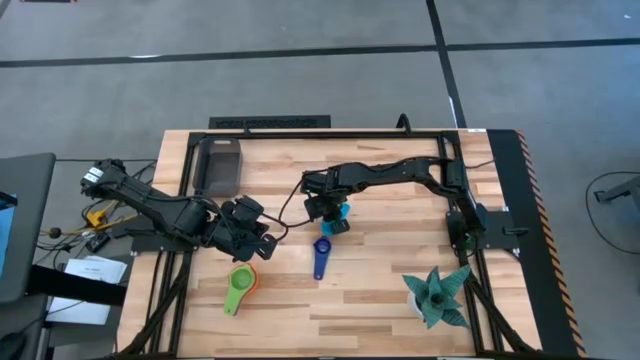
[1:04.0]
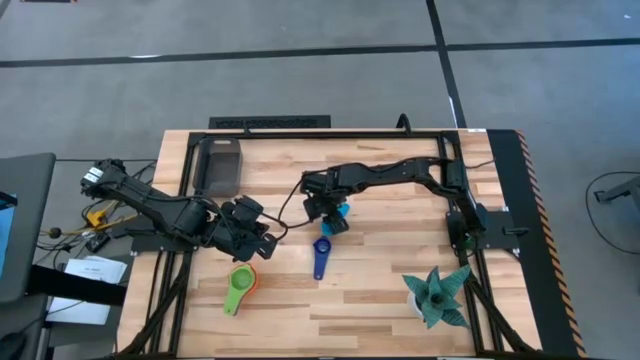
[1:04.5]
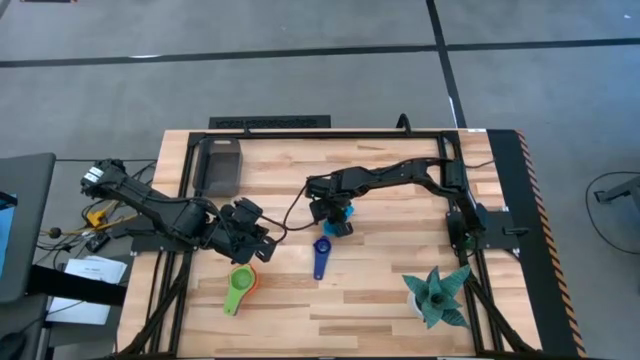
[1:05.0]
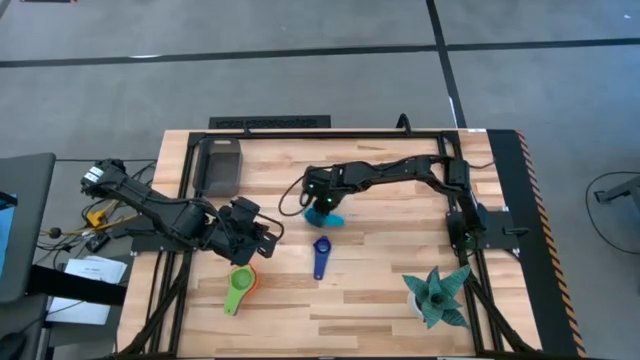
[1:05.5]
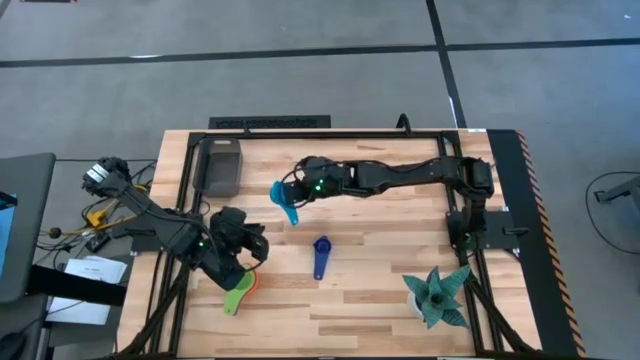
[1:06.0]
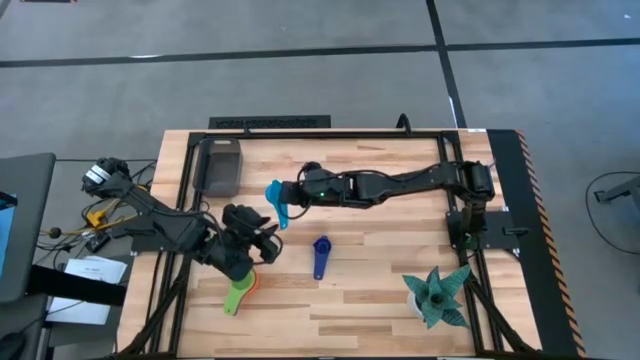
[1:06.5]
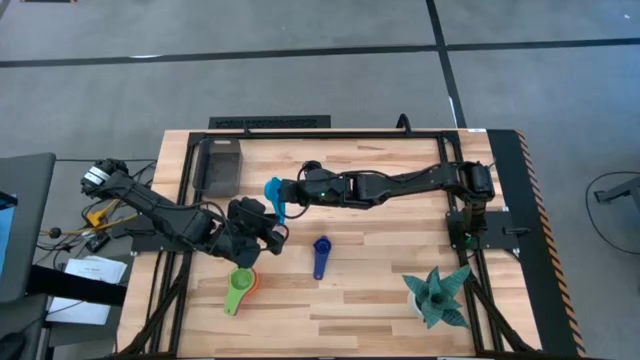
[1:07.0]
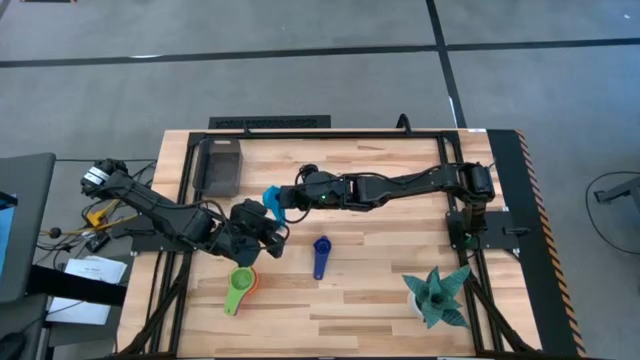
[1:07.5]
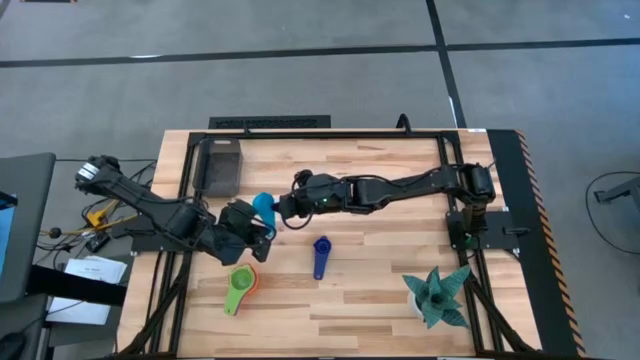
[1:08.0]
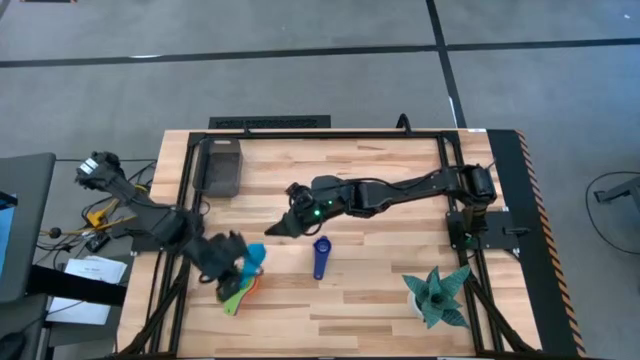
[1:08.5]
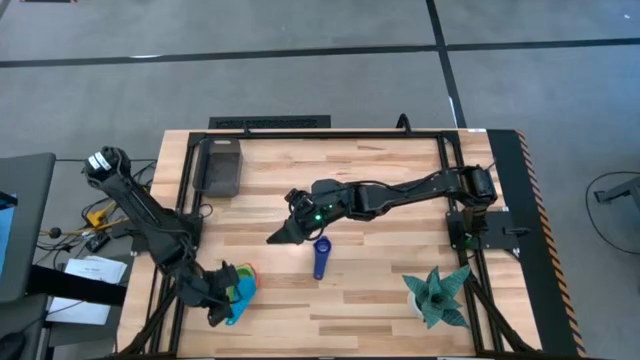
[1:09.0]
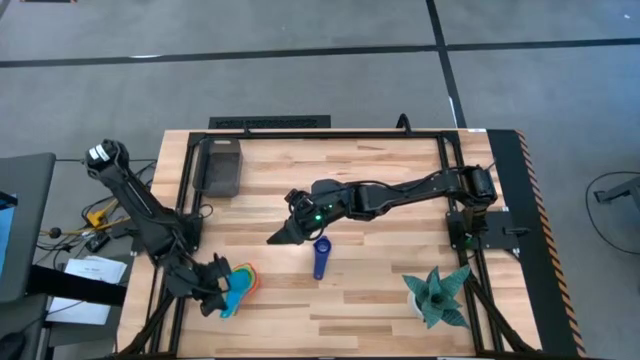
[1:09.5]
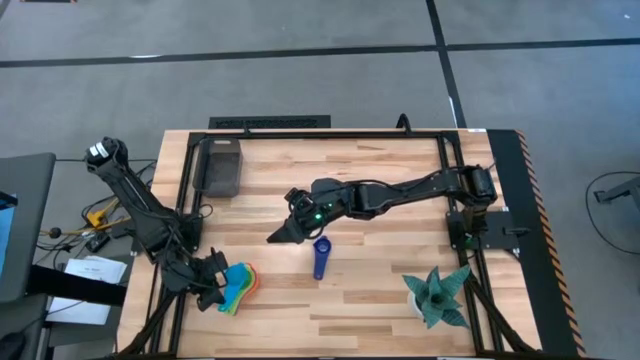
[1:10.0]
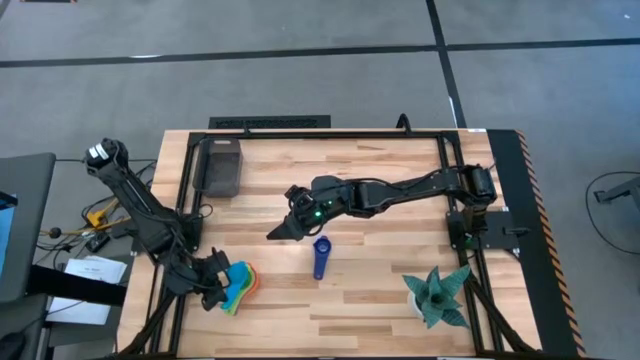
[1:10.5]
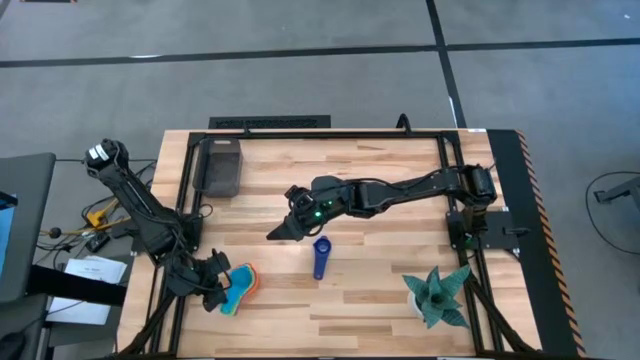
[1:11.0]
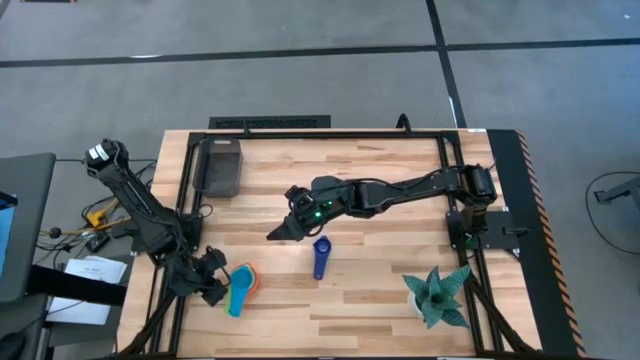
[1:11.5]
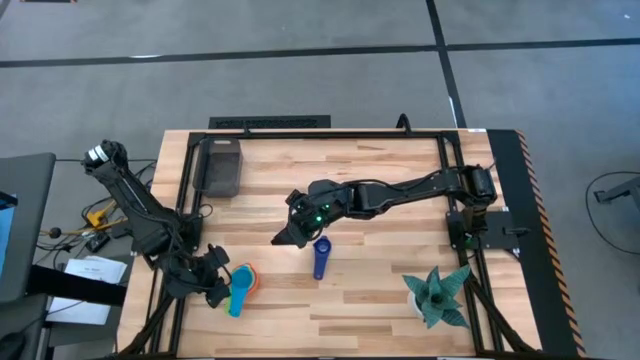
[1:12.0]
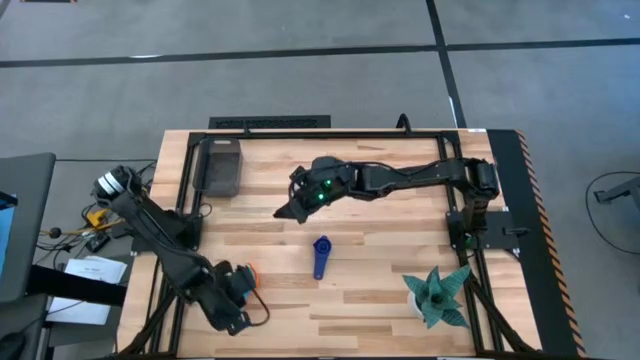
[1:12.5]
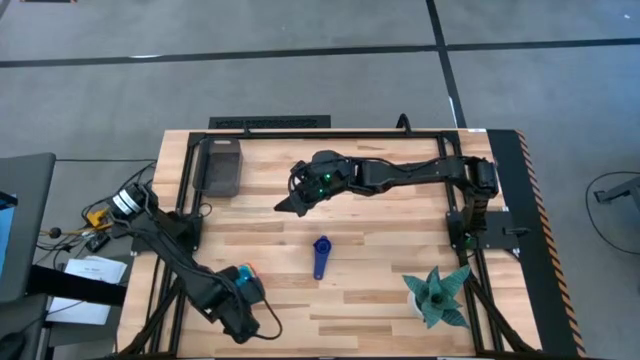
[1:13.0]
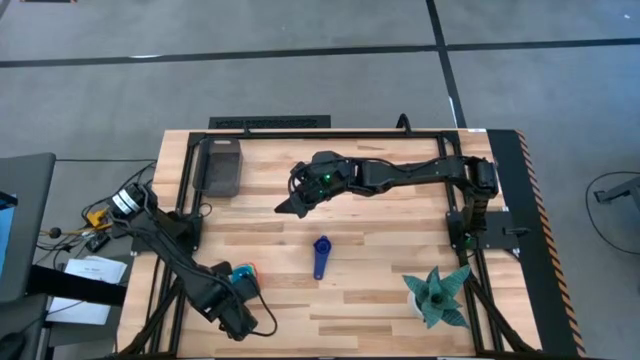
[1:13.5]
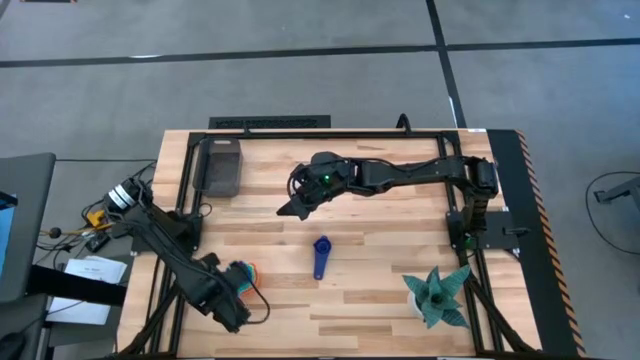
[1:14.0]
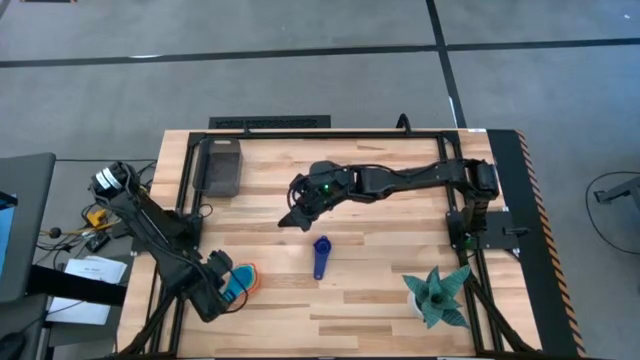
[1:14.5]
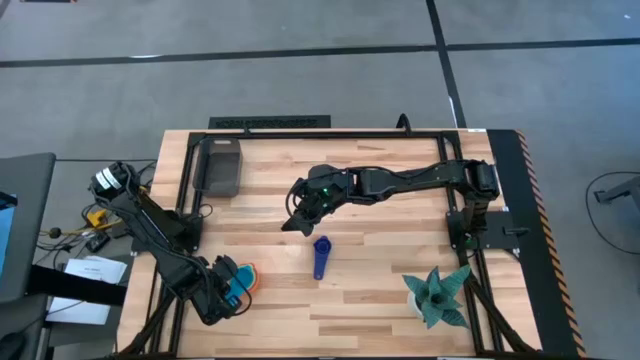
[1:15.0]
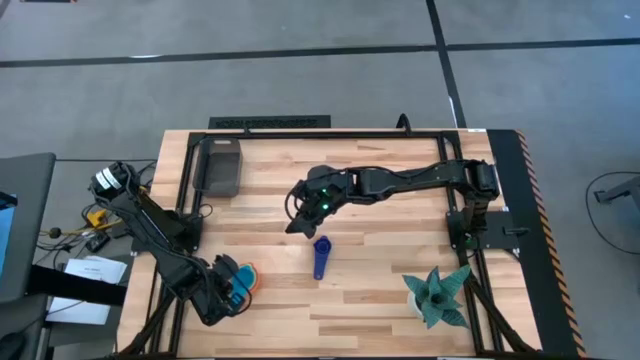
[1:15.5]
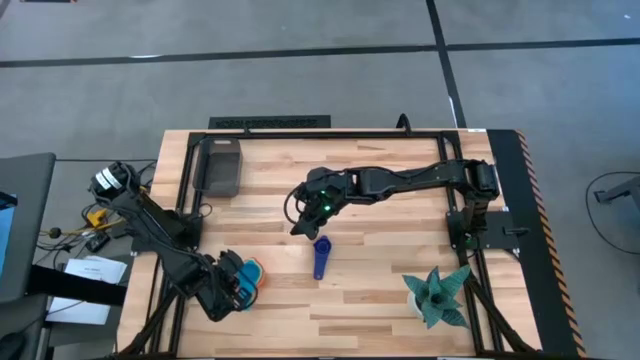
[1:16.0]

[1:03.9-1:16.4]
Task: Nest measuring cups in basket
Stack the light blue measuring cup on top of the light green measuring cup

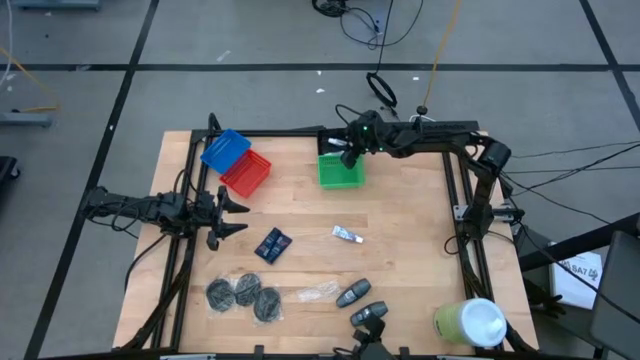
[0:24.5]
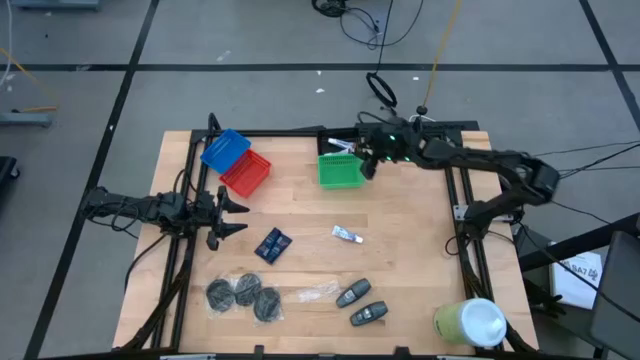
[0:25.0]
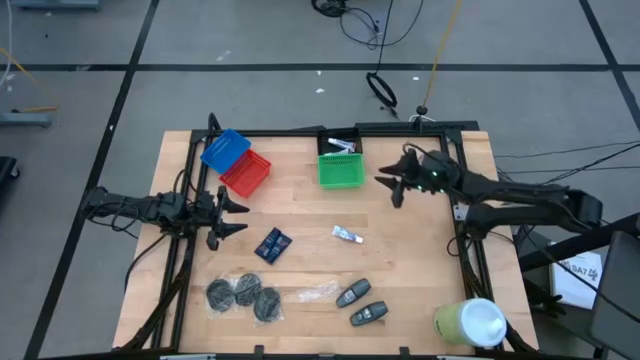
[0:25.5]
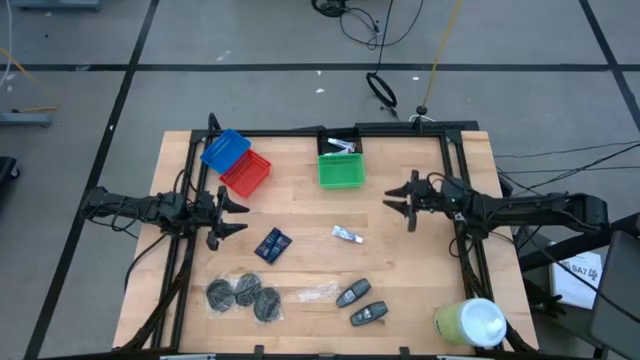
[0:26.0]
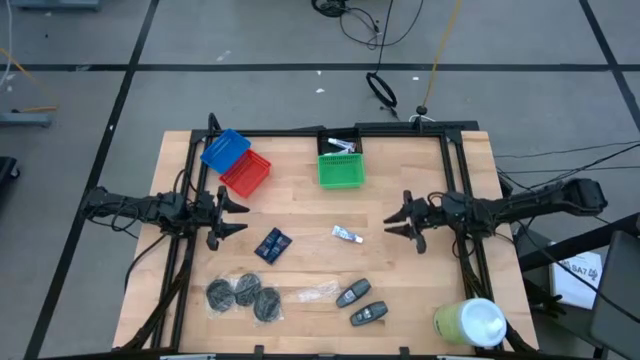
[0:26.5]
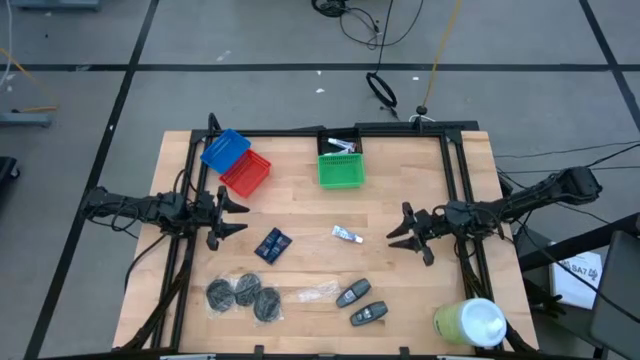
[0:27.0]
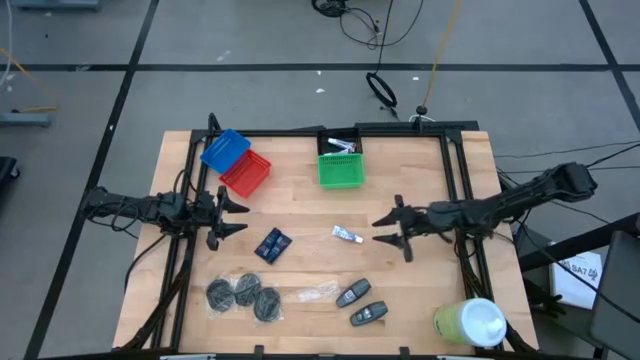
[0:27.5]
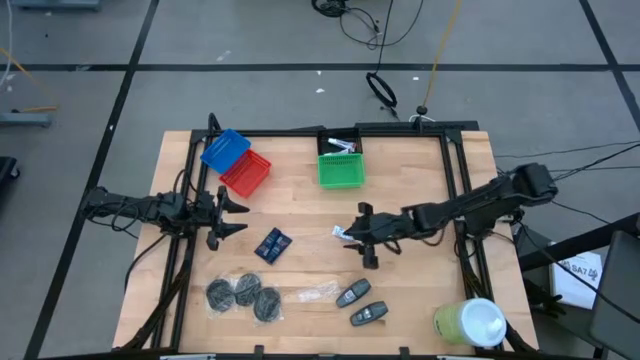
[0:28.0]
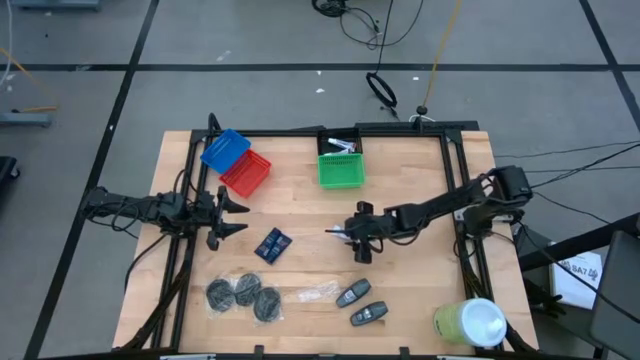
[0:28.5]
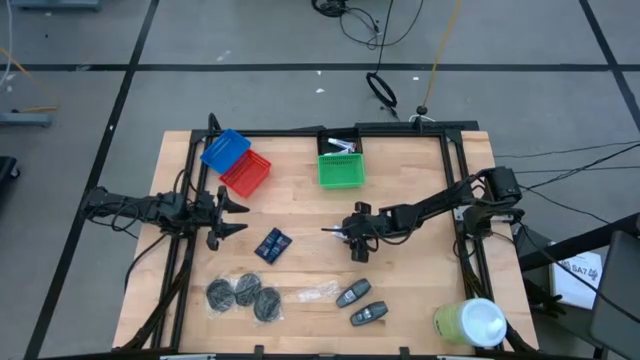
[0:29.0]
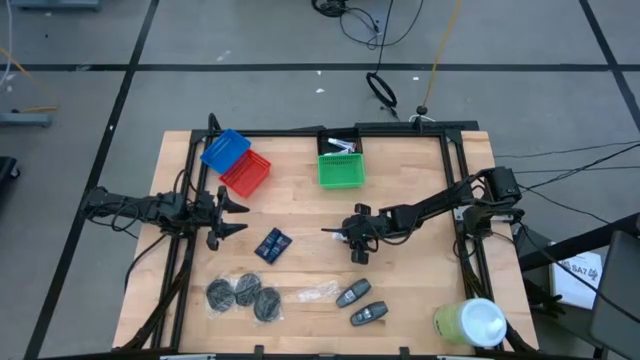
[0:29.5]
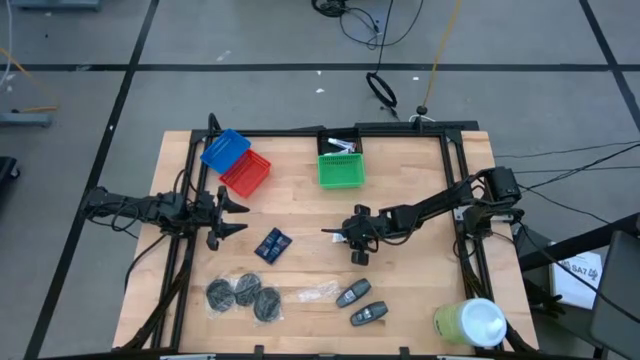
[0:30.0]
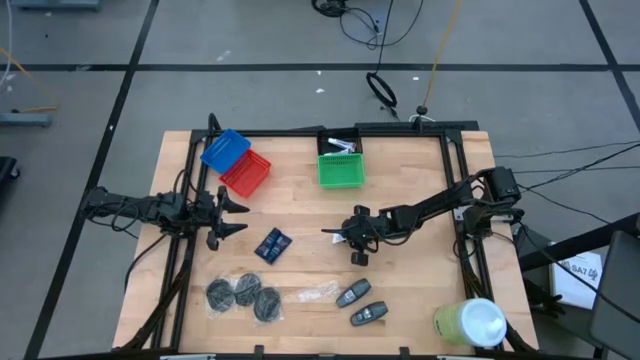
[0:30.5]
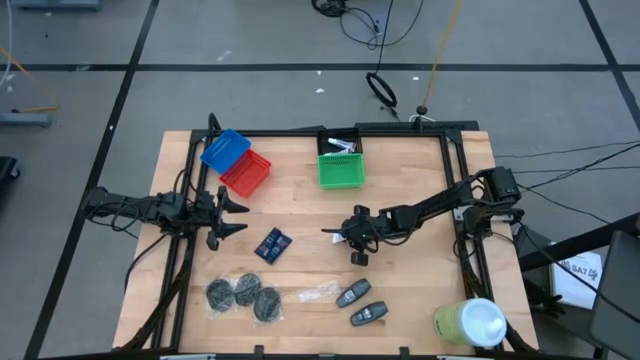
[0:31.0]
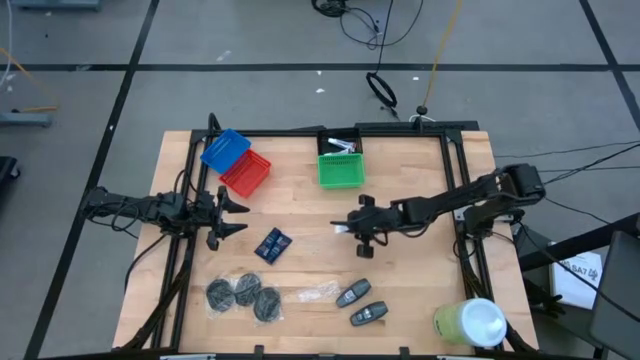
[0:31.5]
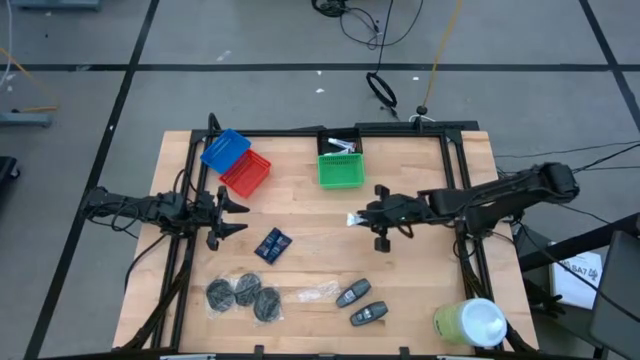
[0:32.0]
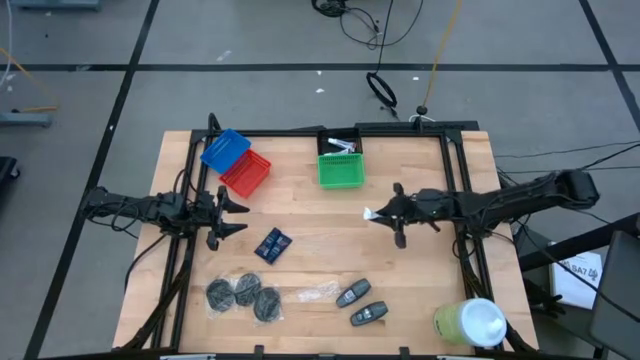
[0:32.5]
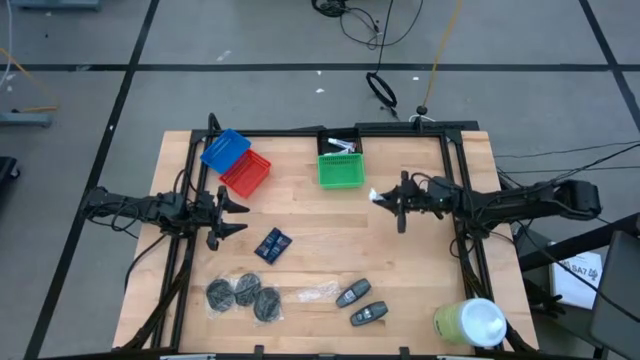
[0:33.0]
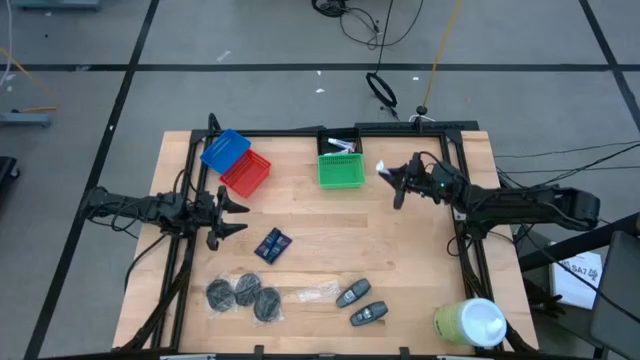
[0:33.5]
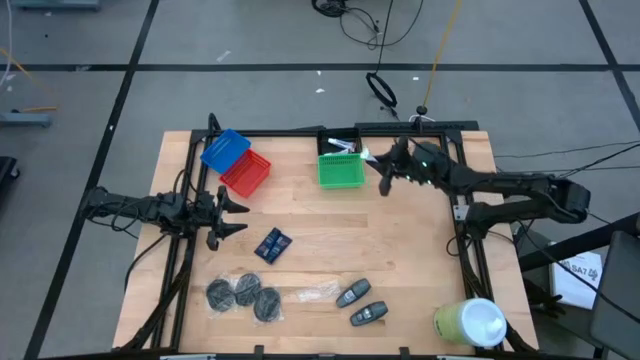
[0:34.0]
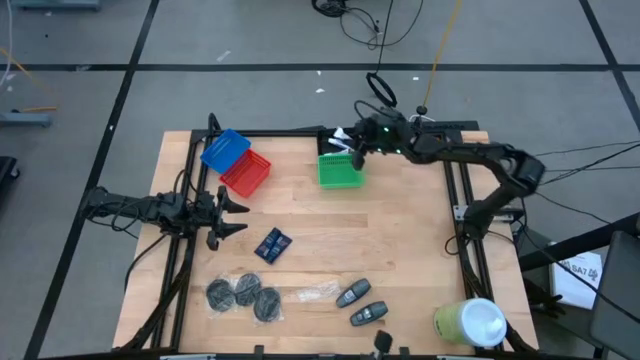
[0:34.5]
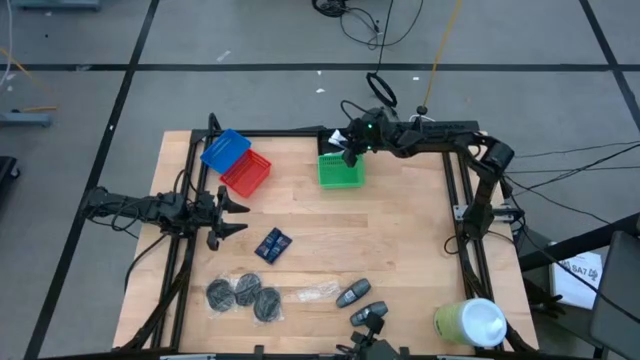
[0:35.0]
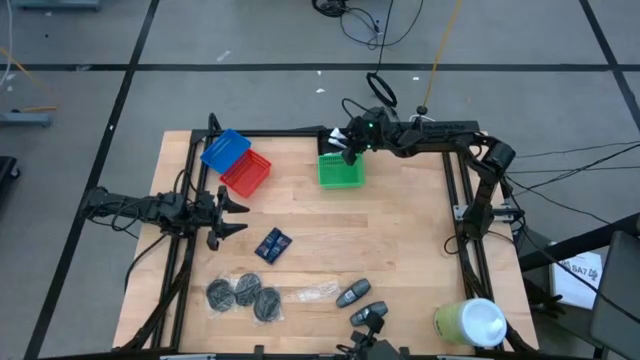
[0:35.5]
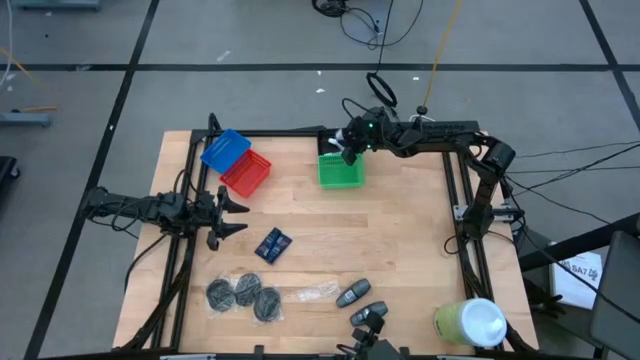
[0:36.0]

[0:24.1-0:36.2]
Task: Pick & Place Travel size toiletries
Put the white toothpaste into the black bin
